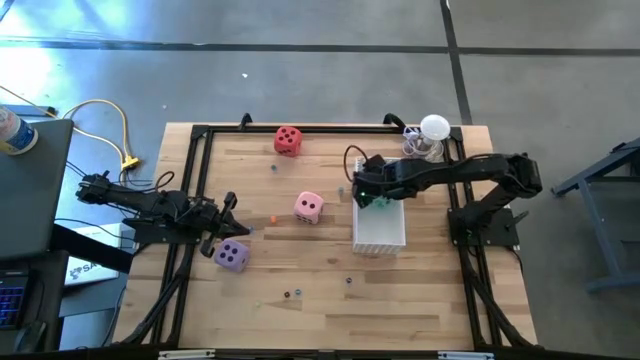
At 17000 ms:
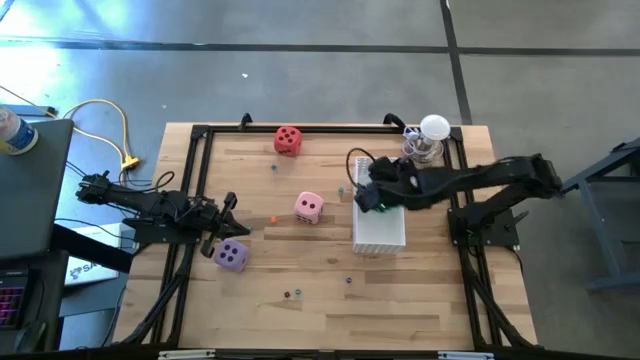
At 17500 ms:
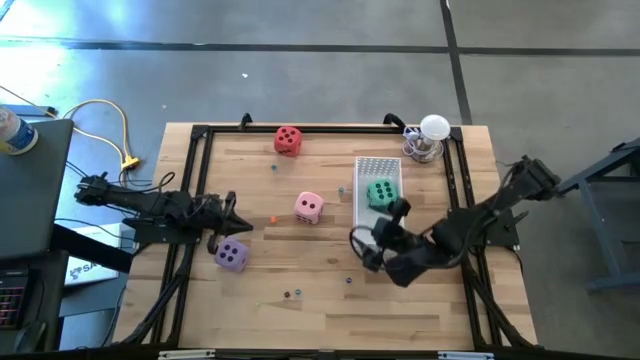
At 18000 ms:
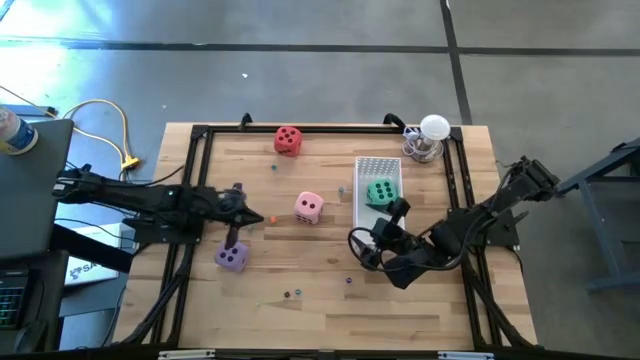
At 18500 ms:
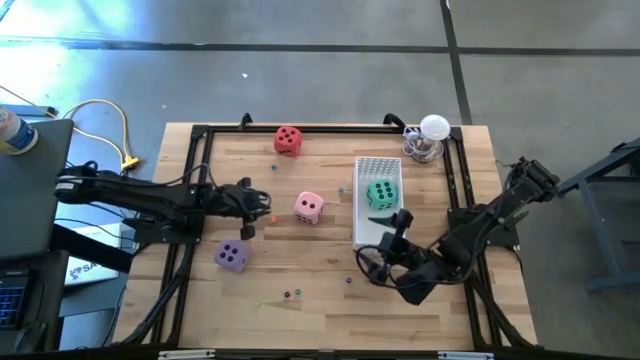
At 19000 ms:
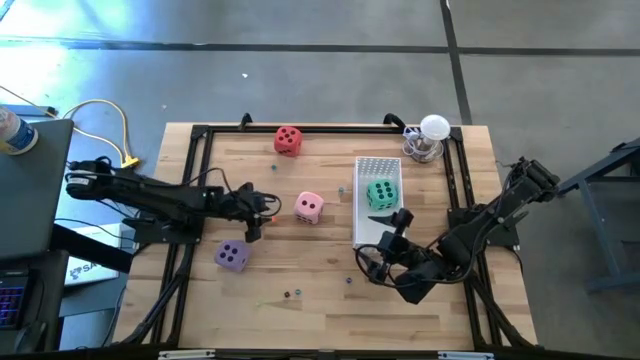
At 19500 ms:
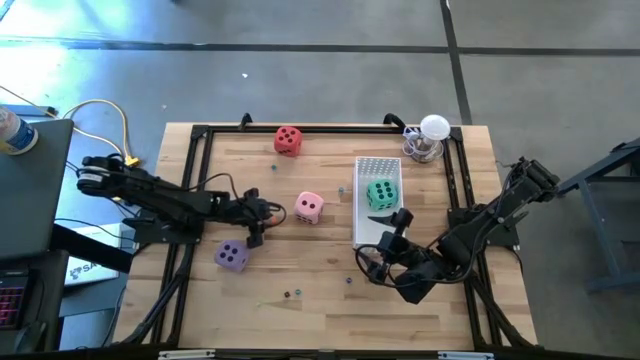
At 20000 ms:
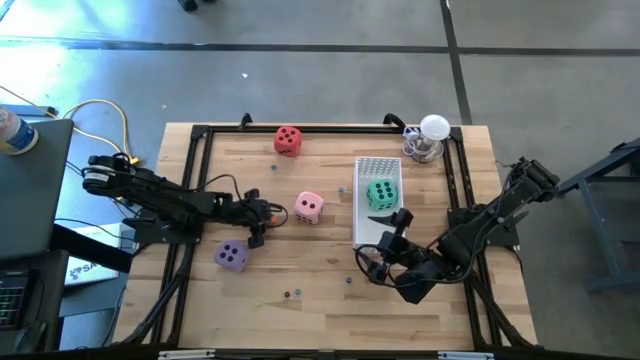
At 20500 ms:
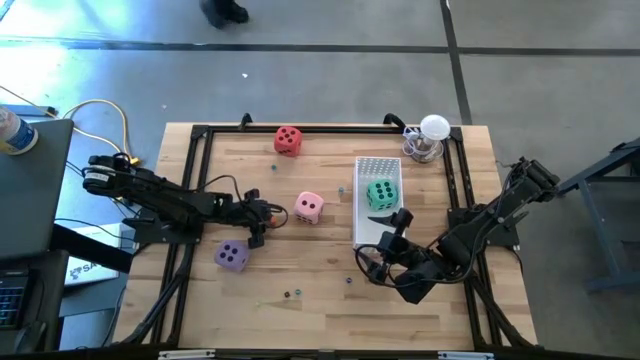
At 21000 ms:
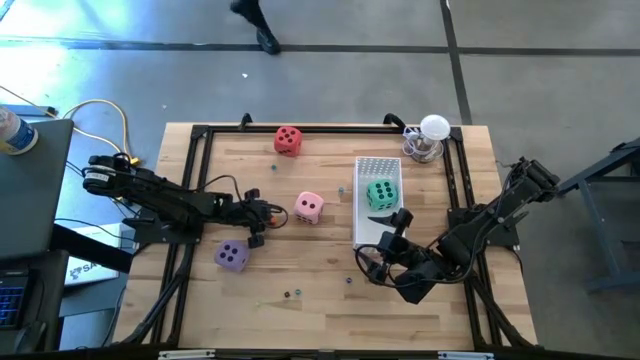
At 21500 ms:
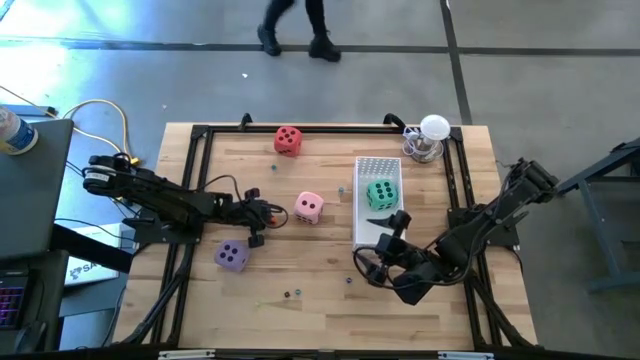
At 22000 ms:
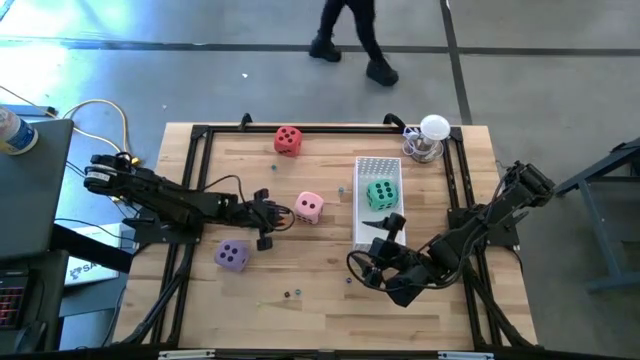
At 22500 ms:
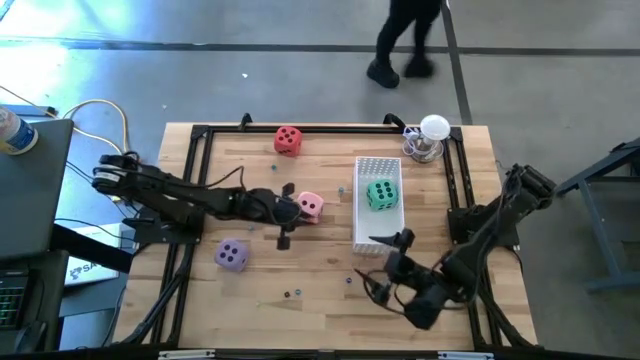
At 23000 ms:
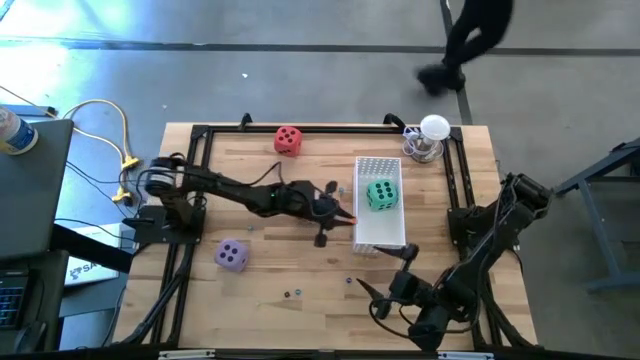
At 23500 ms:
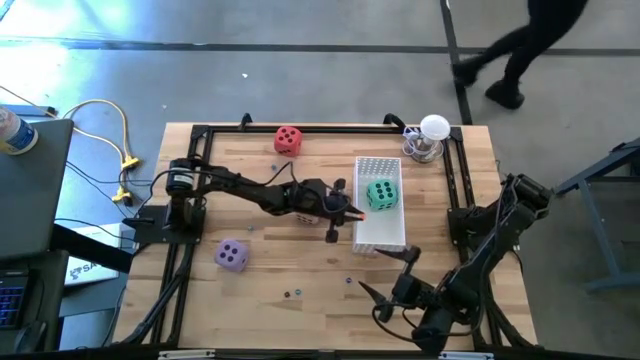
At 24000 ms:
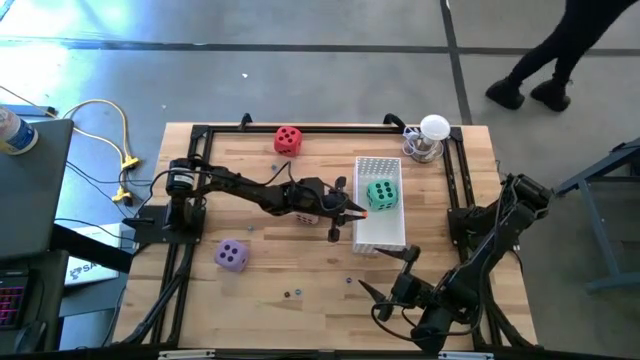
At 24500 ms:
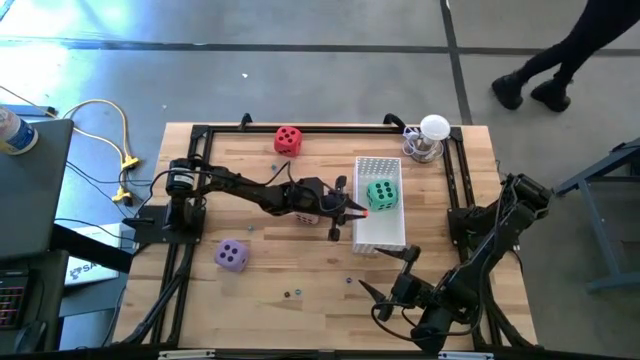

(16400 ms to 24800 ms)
Task: Pick & Place Dice
Put the orange die into the white bin

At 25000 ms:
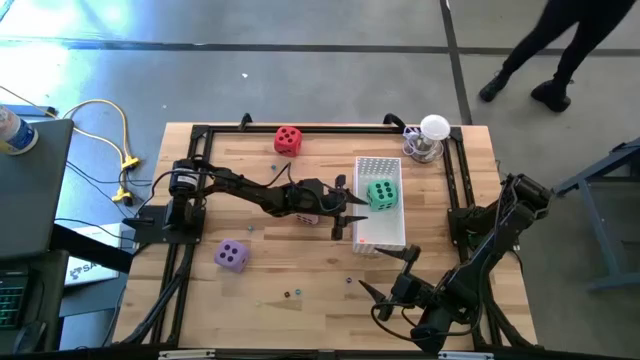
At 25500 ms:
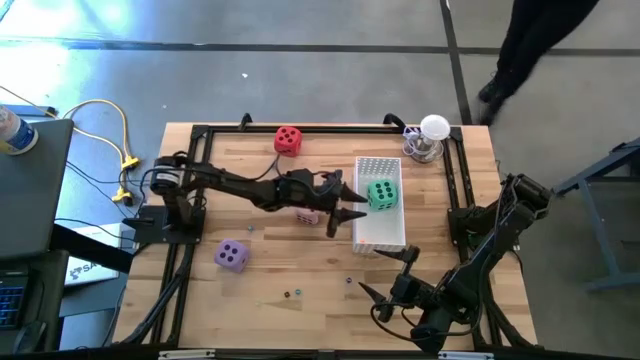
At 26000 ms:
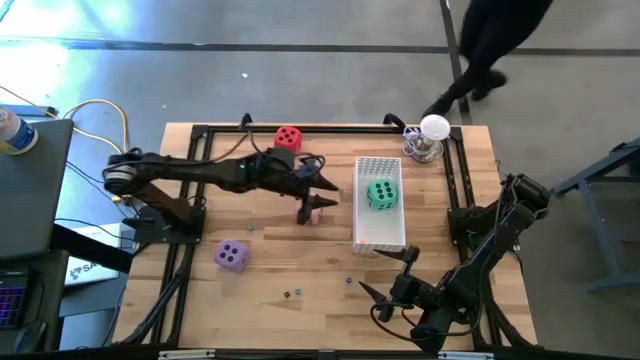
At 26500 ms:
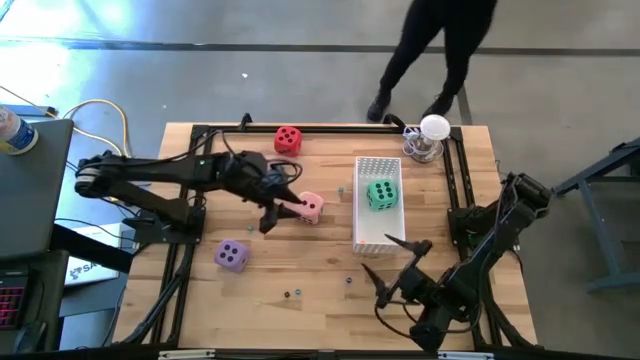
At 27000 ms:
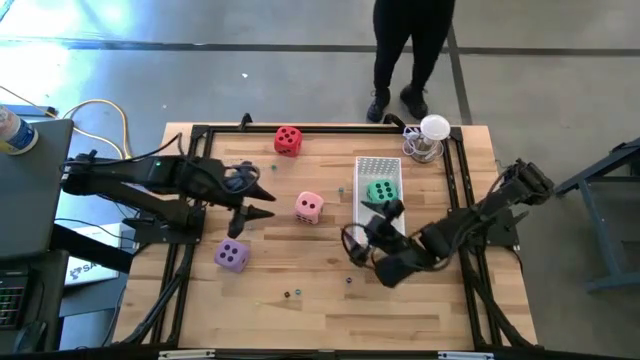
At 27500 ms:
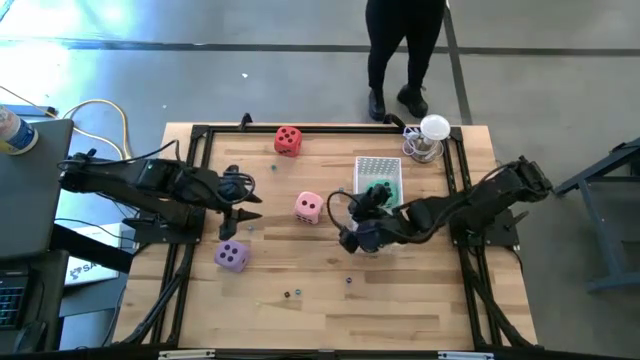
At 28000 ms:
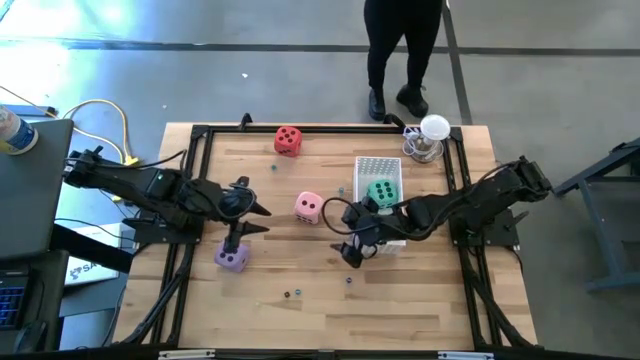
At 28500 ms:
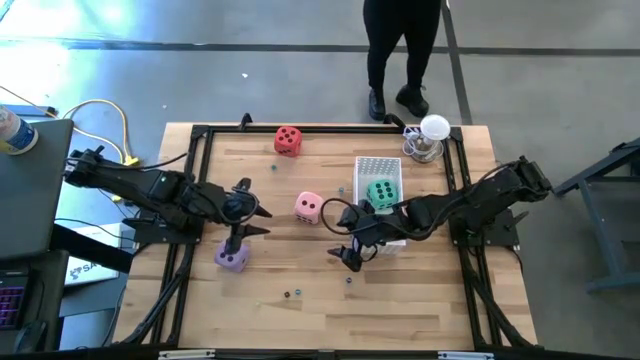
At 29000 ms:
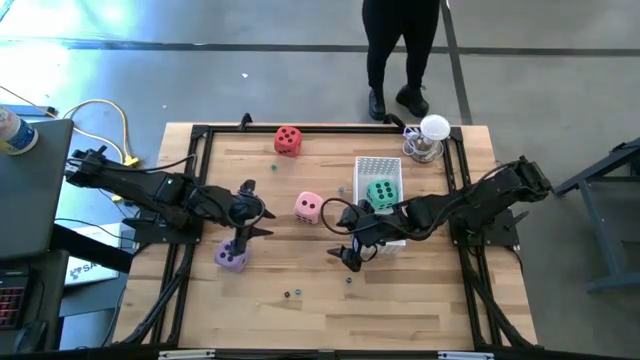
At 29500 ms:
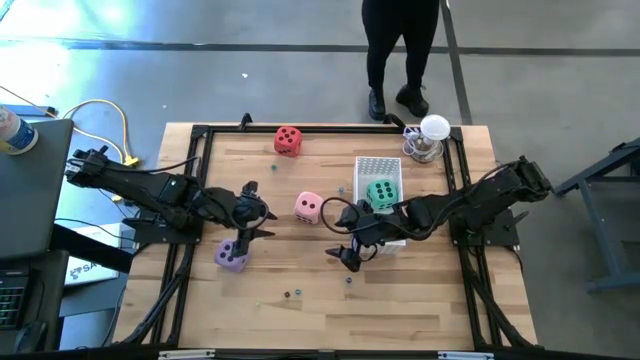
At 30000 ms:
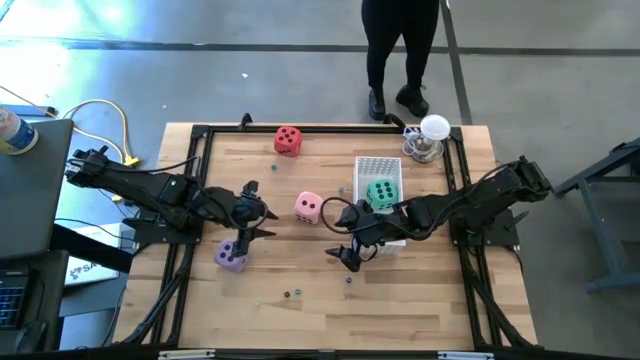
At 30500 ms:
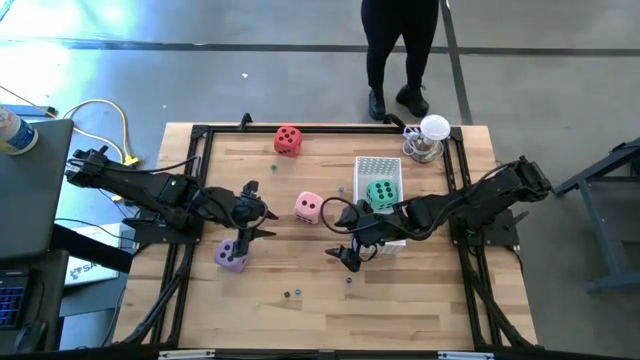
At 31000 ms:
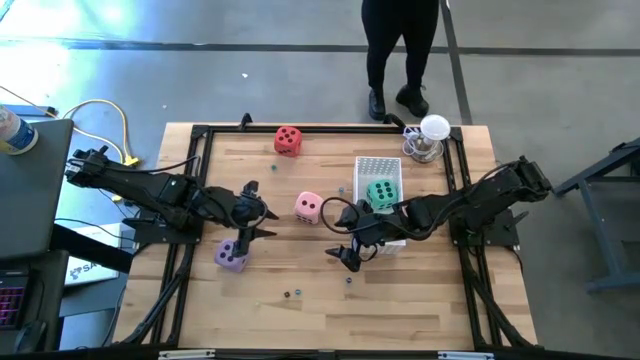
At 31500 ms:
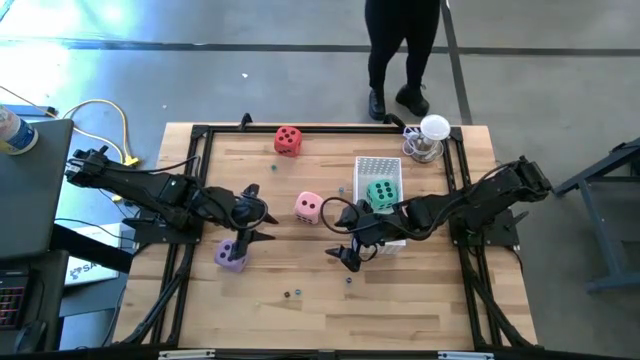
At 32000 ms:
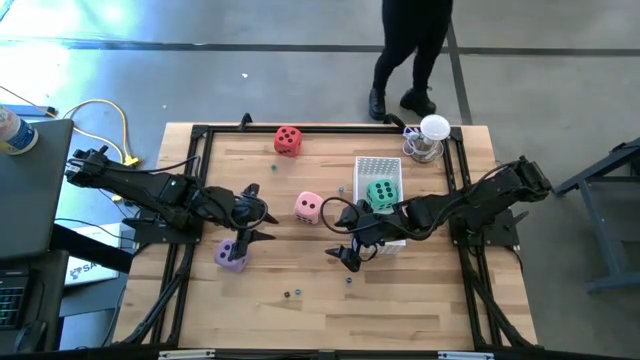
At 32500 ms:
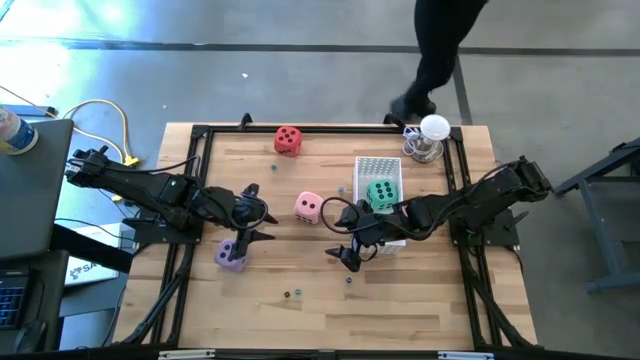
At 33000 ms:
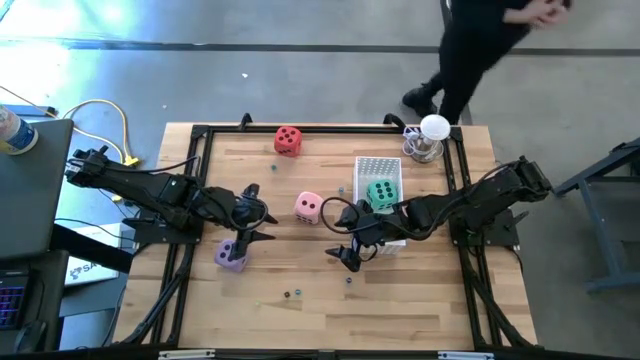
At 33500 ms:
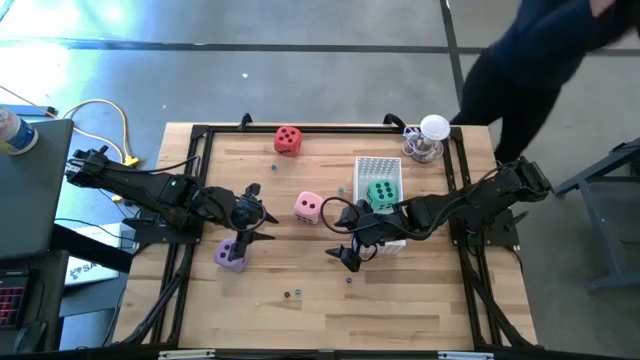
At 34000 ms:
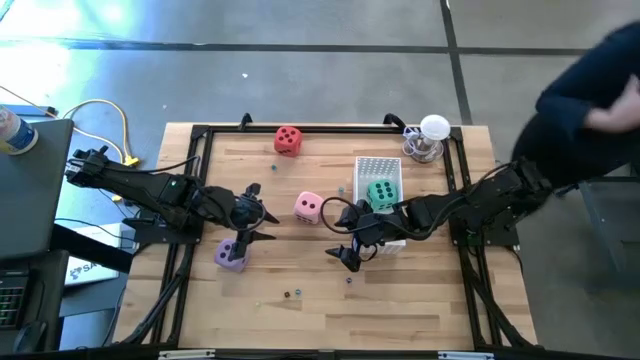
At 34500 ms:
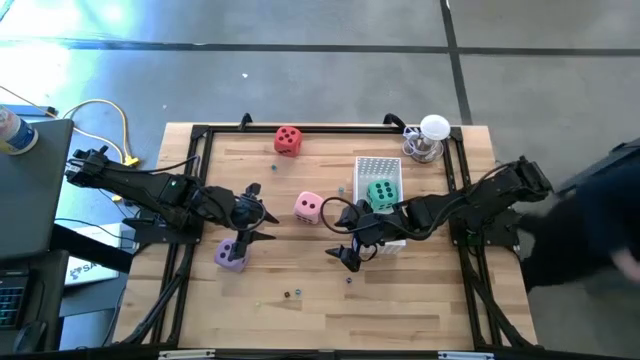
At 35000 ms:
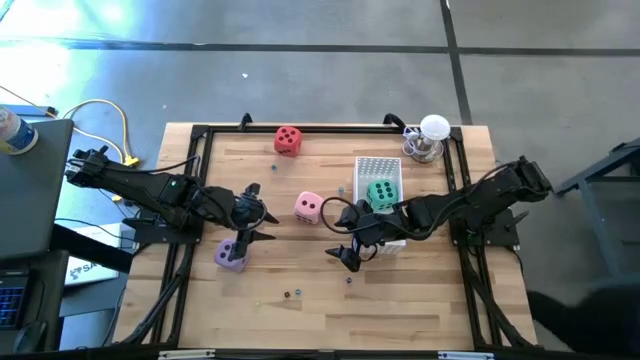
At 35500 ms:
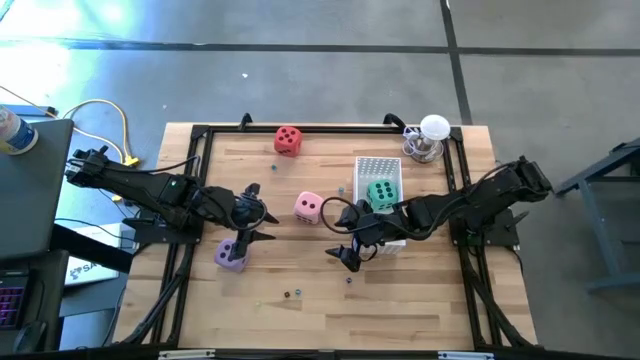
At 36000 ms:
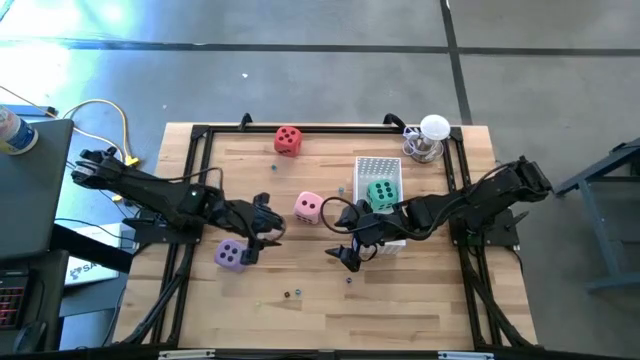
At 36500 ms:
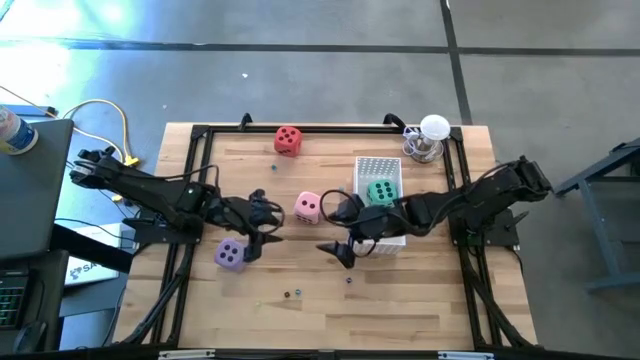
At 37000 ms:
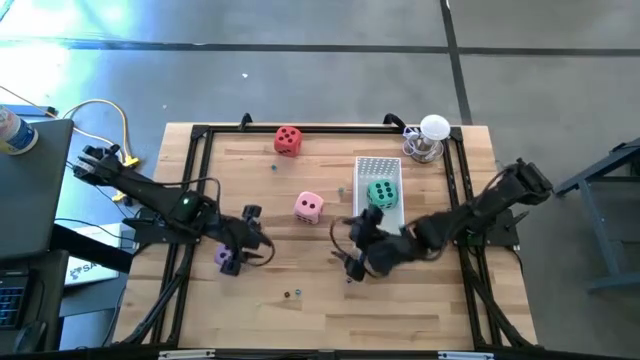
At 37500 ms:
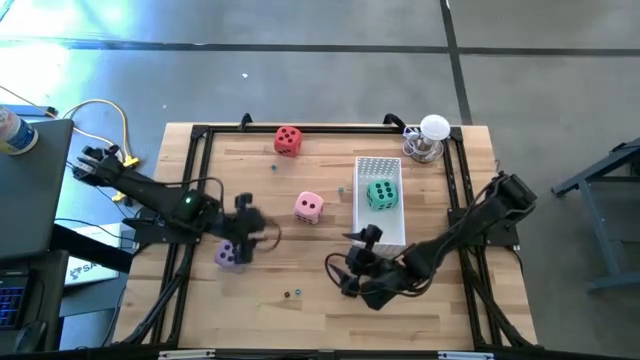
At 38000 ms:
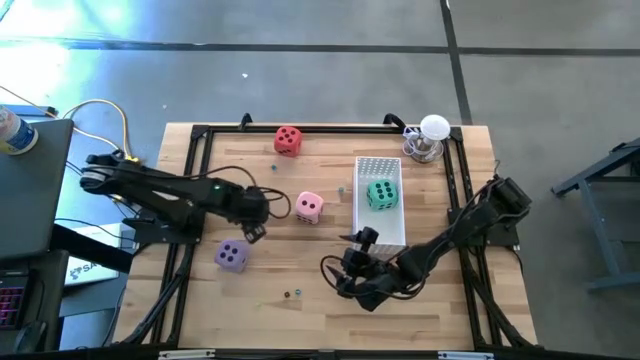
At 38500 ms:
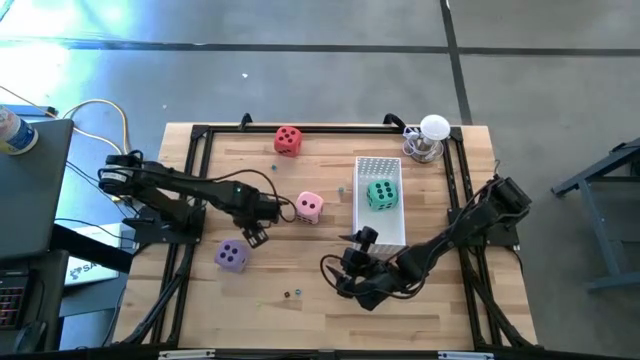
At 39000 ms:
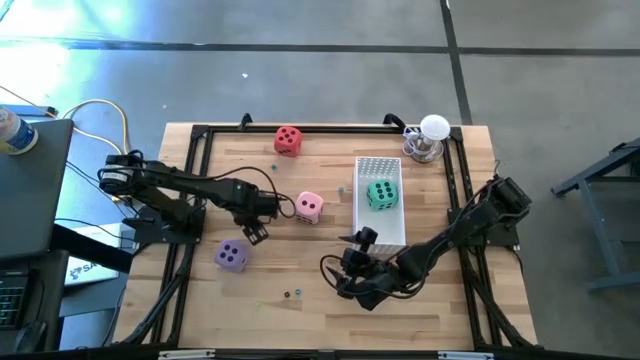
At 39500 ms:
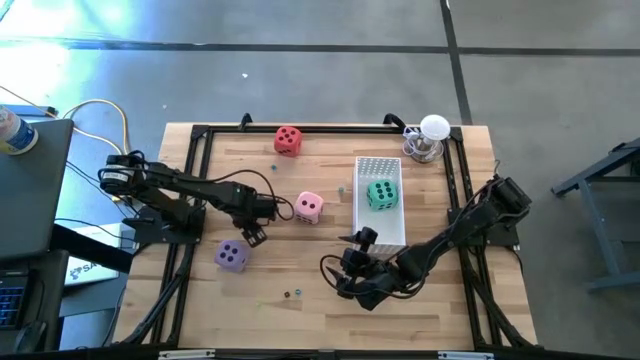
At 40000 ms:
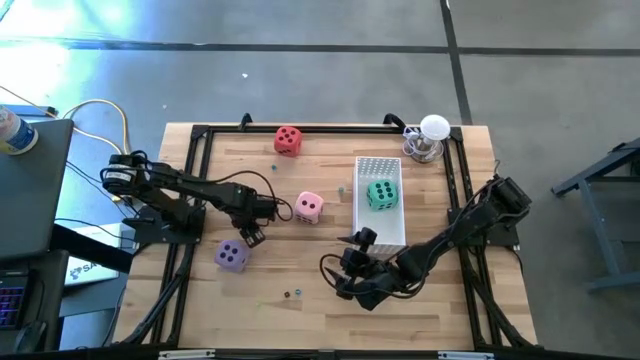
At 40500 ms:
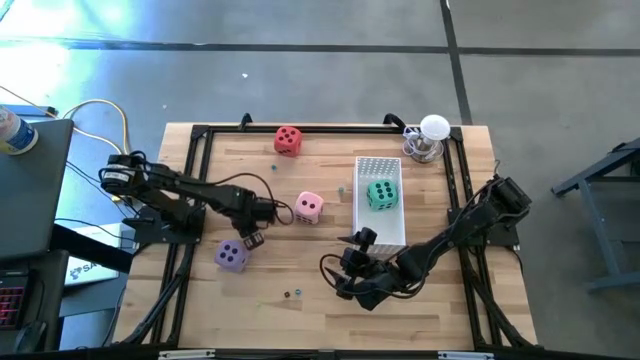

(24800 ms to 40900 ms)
Put the light blue die into the white bin
